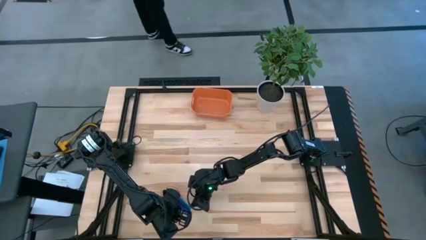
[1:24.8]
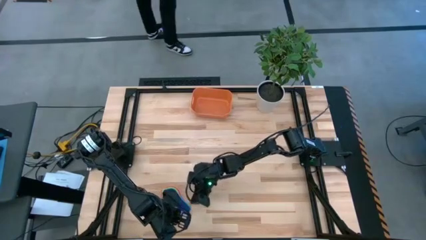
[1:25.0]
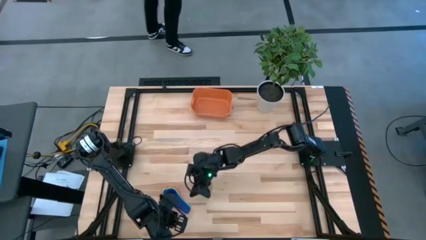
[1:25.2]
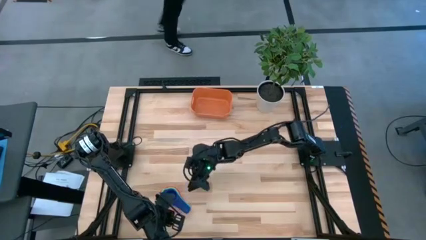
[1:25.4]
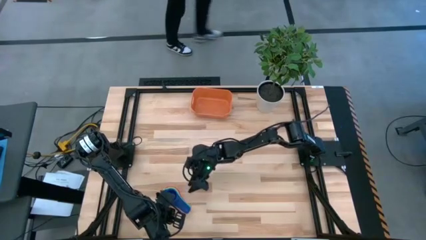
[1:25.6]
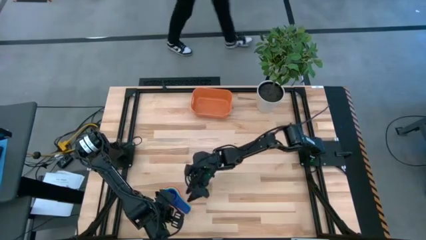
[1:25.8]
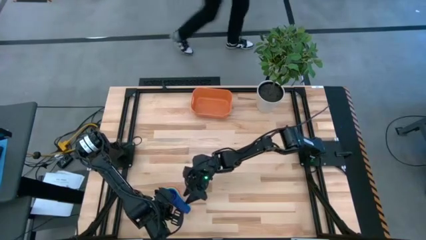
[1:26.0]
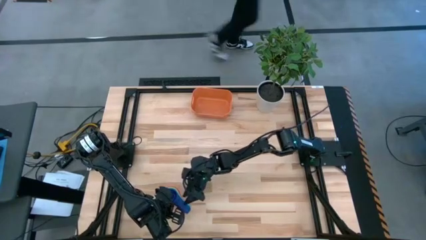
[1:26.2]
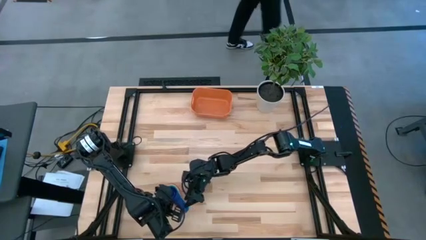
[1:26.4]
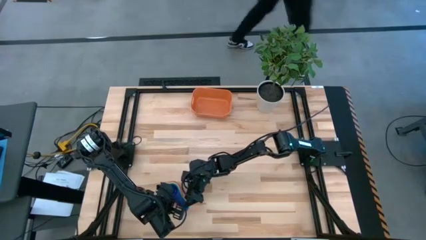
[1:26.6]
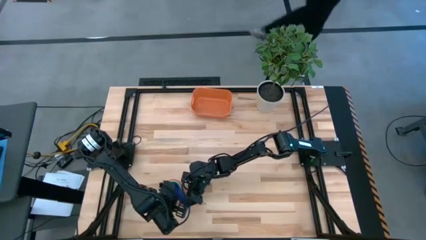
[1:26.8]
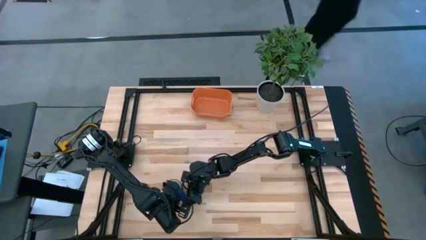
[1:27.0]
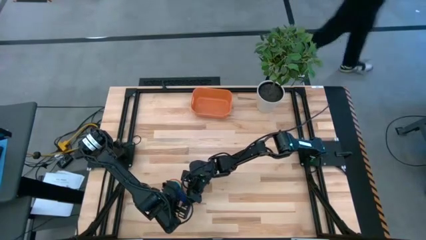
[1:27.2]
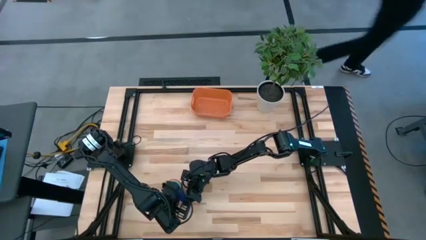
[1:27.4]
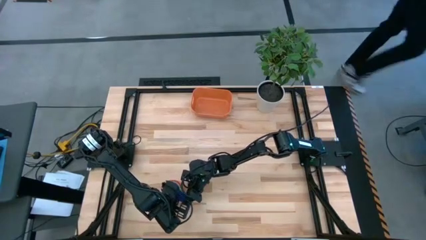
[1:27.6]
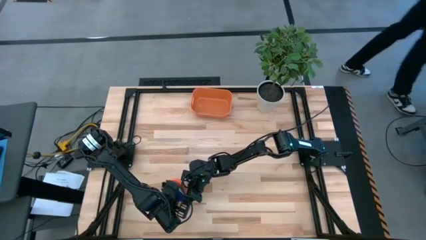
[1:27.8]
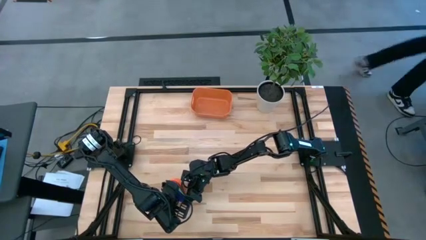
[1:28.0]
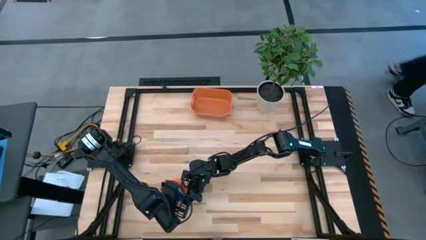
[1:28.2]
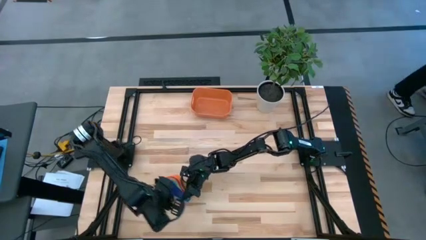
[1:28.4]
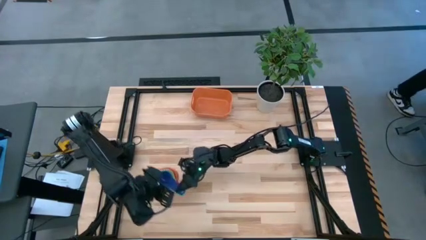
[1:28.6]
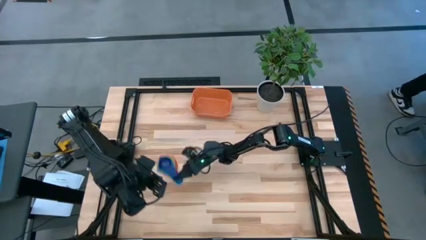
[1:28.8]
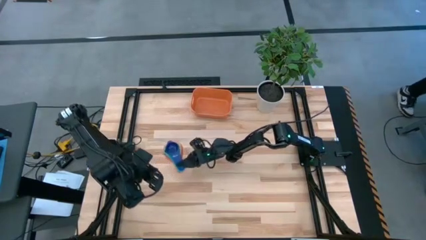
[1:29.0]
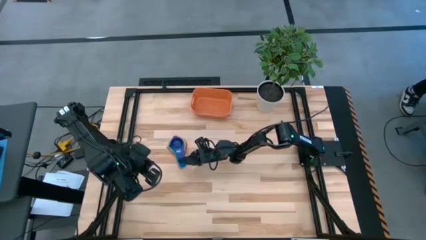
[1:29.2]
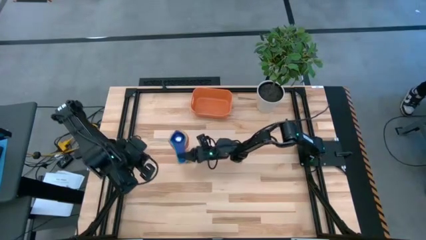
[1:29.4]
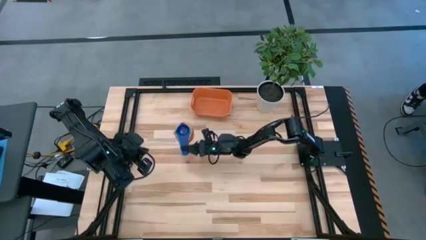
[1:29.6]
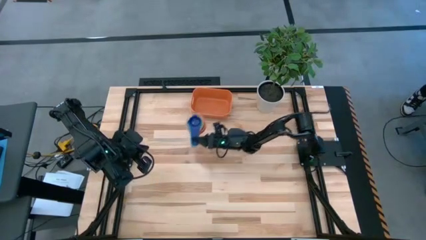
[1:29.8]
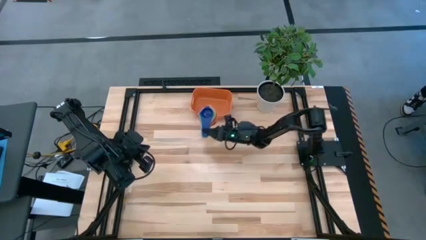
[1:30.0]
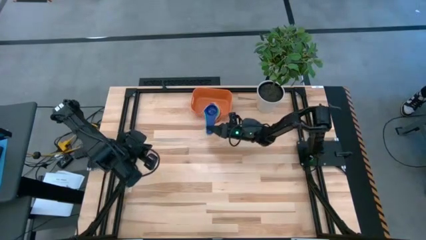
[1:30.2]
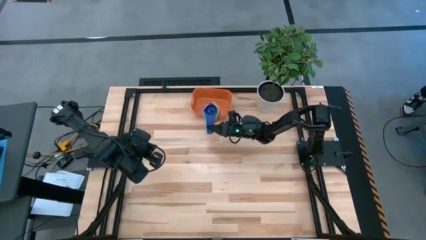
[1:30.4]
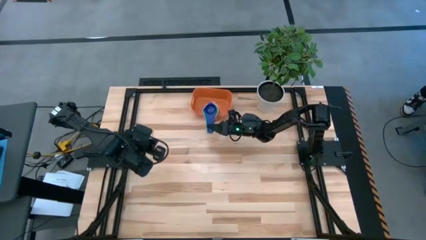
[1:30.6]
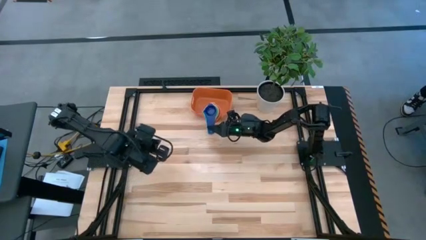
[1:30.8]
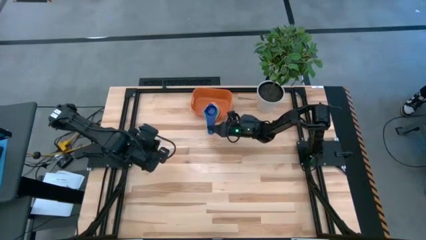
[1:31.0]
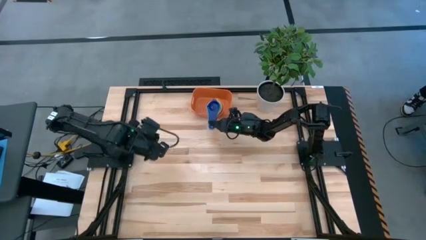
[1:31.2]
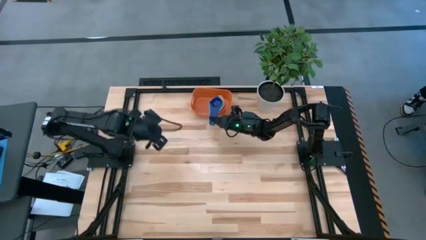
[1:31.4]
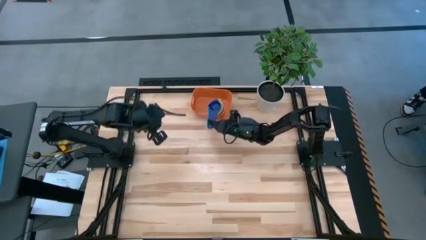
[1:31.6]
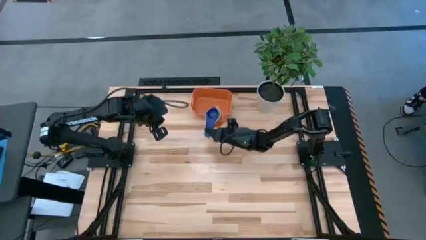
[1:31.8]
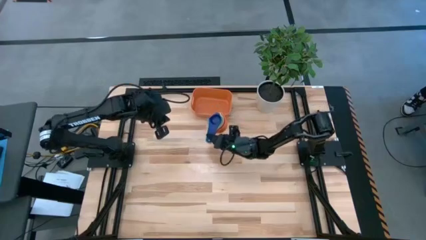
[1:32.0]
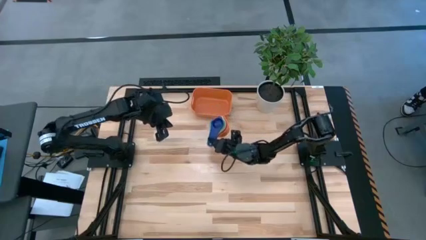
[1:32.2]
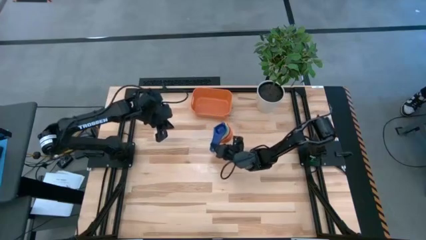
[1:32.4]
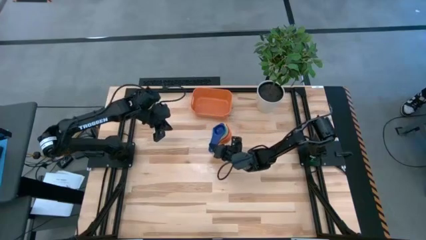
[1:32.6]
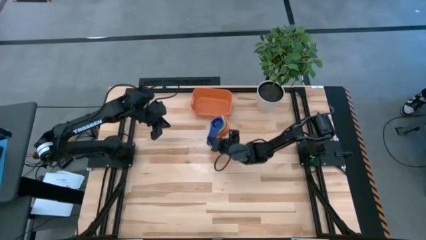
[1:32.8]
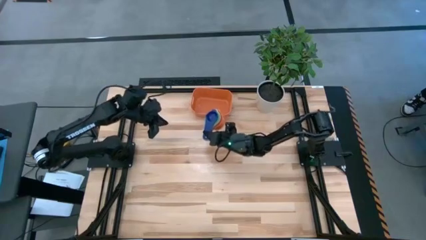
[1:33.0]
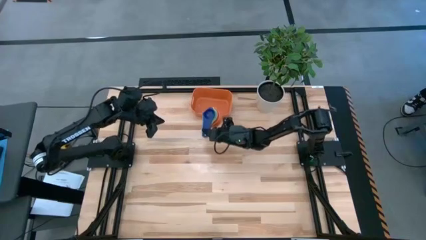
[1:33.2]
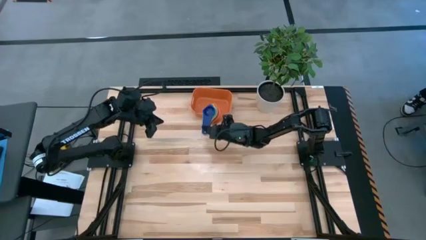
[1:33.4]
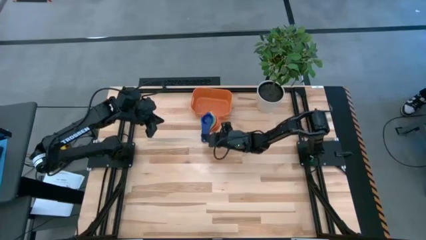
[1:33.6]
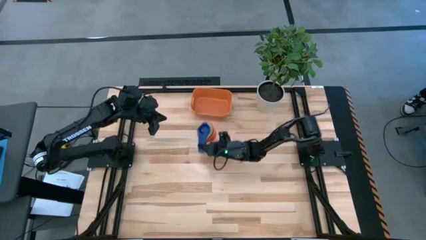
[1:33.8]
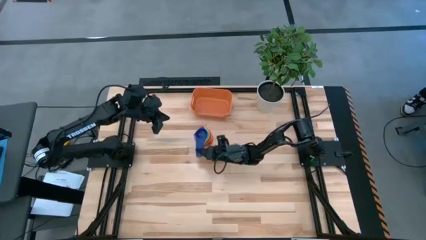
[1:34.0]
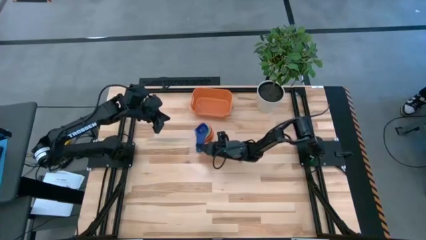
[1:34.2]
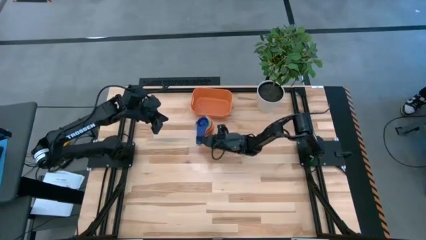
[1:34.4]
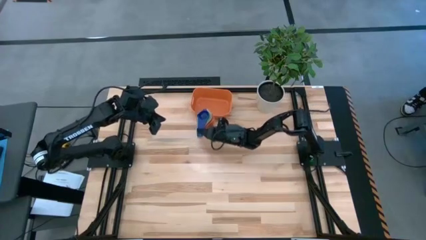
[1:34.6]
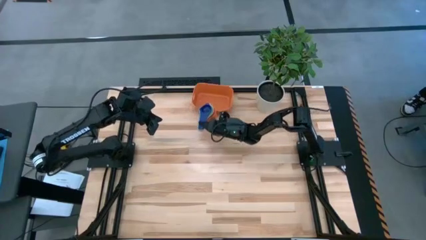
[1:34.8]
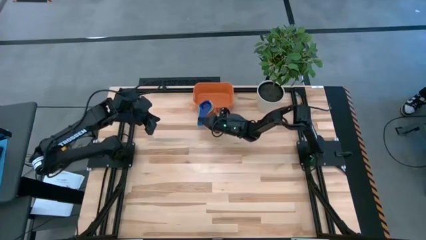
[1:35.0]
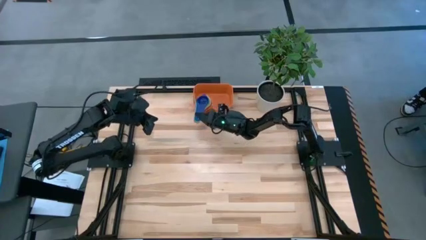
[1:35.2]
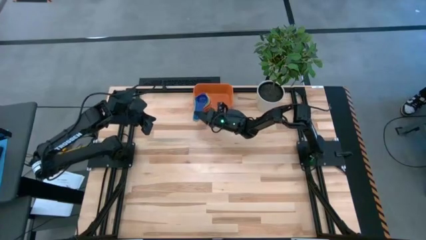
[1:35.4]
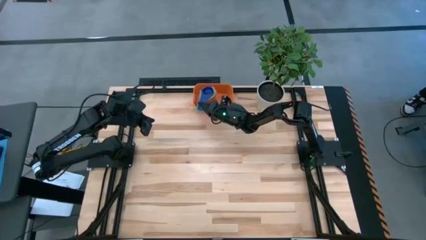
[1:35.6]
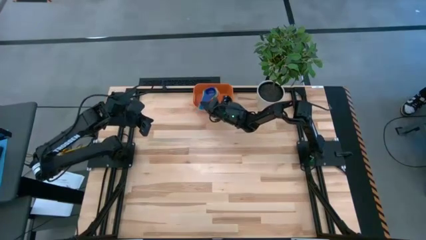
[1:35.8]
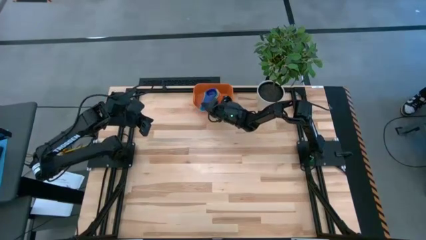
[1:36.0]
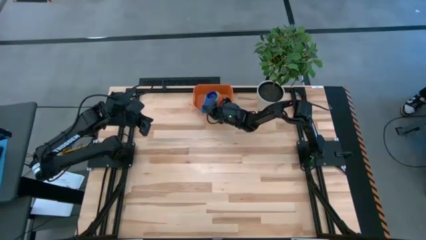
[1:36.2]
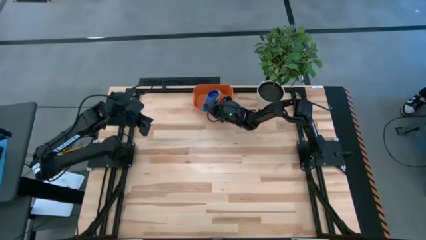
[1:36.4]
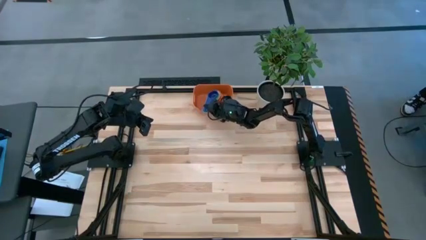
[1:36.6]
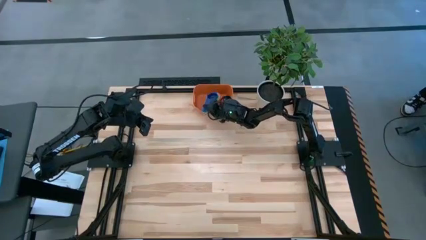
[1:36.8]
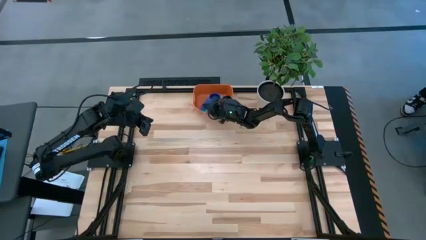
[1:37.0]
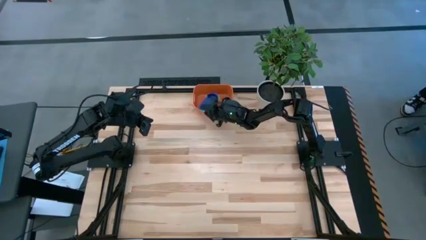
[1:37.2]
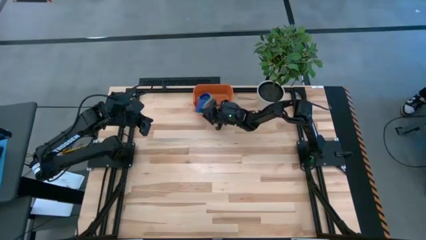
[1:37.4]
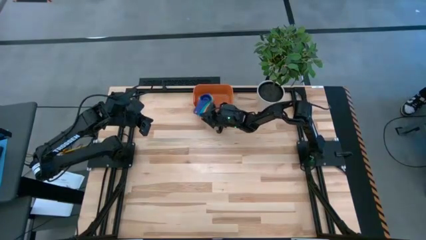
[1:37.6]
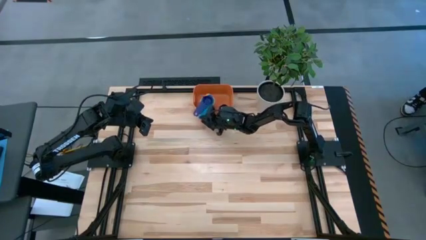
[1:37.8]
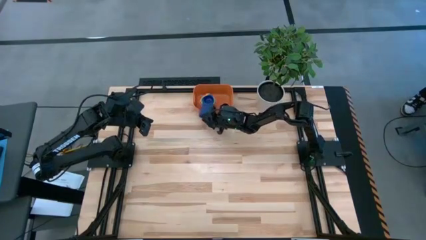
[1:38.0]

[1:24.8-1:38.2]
Task: Nest measuring cups in basket
Put the nested measuring cups into the orange bin

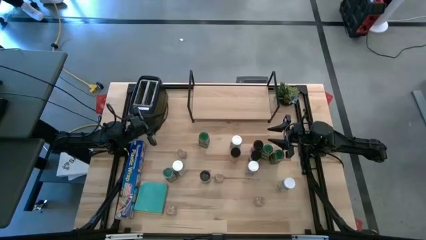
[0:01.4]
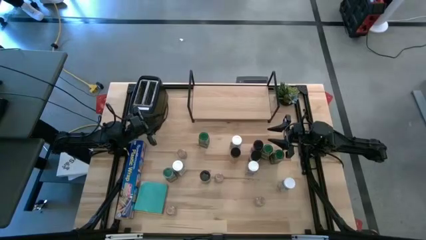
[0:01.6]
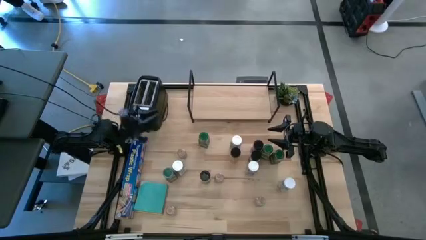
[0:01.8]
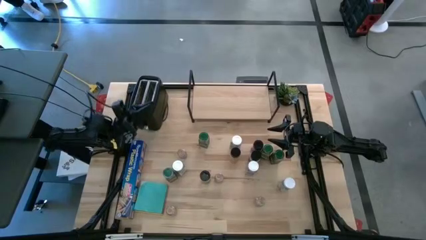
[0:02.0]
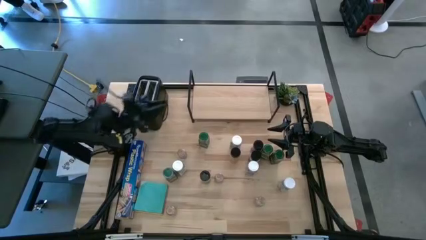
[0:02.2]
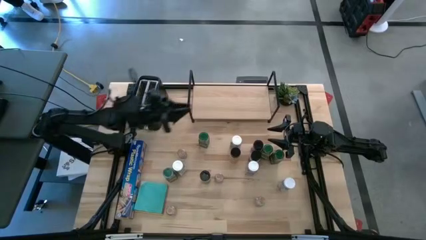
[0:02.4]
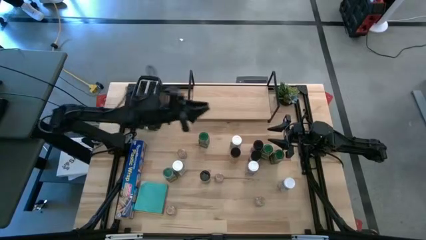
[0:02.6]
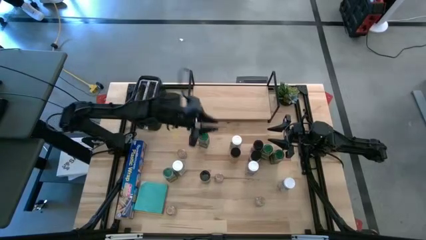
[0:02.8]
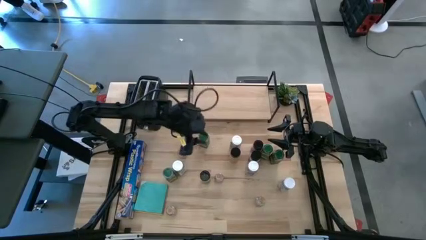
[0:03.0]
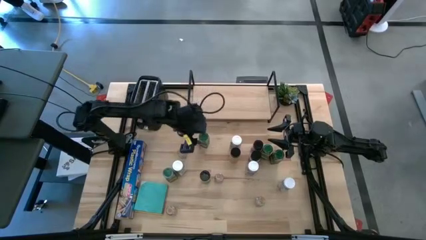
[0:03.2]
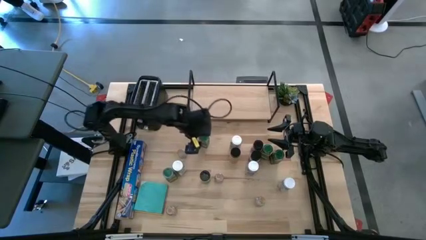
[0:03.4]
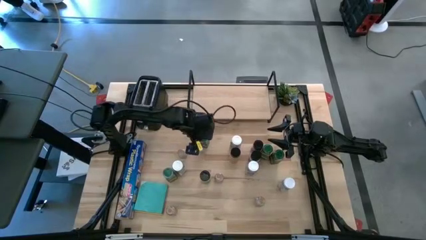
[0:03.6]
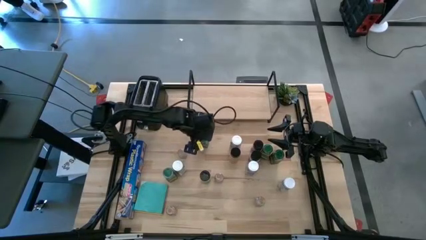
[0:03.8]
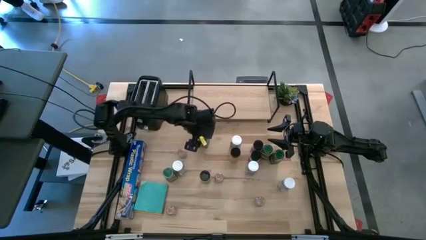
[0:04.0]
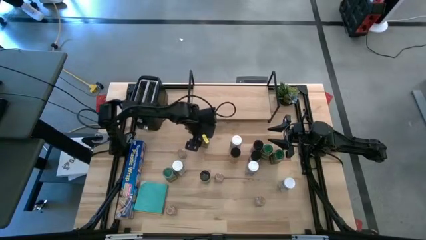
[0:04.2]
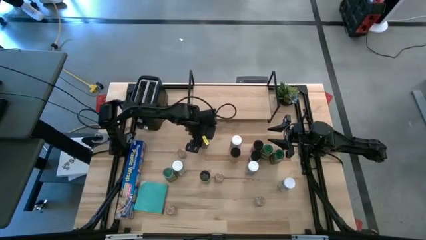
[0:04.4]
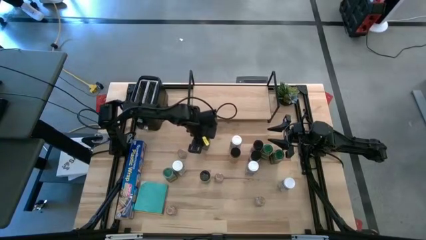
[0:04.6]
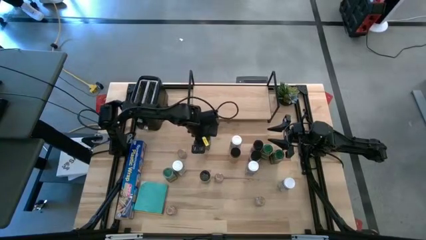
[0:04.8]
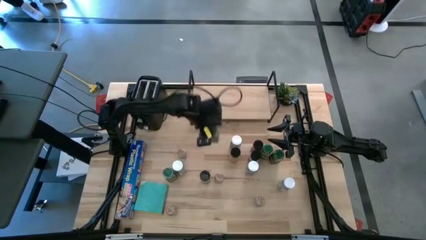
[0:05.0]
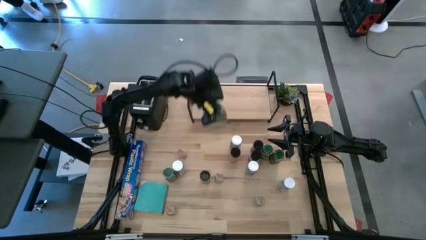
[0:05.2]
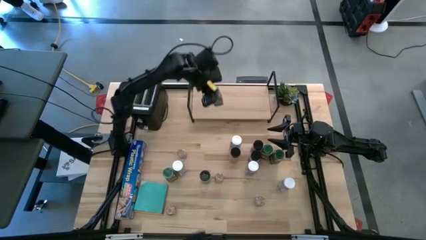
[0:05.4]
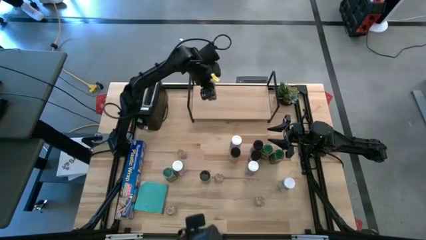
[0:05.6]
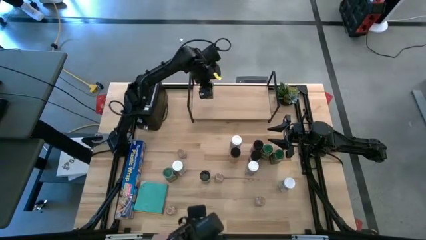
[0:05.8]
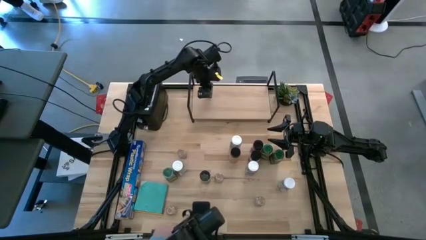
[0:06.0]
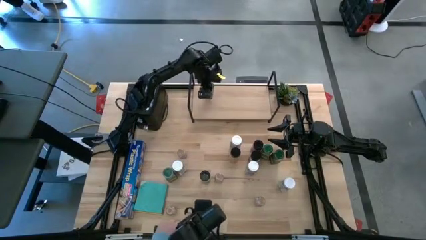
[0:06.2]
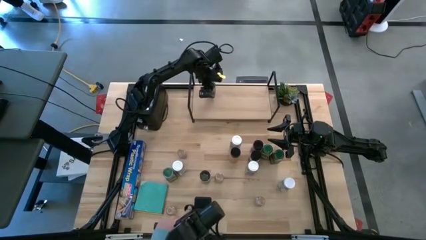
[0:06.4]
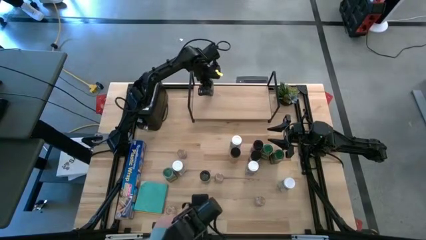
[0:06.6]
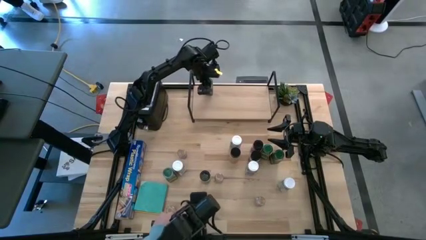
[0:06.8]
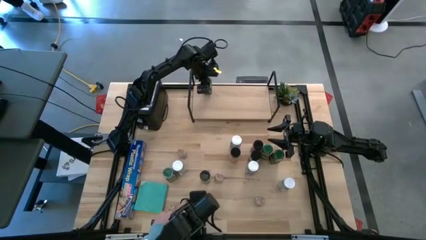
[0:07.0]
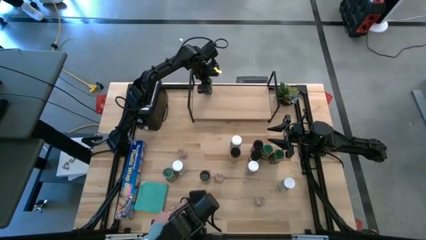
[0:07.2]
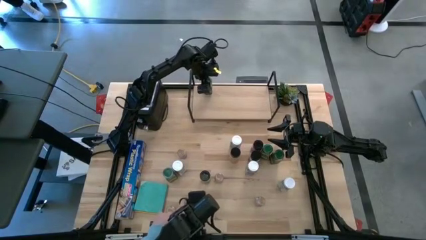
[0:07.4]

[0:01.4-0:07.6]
Task: Shelf spices
Put the top left green seasoning bottle on the shelf
